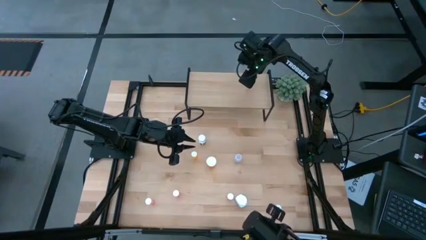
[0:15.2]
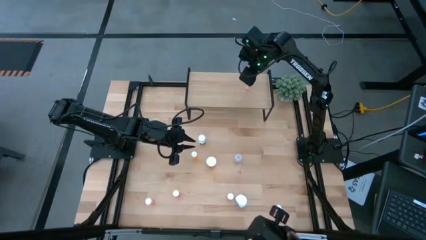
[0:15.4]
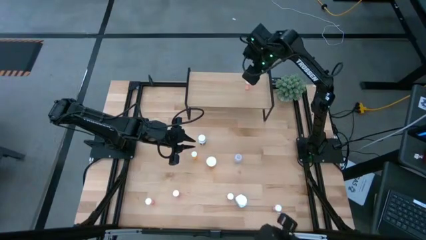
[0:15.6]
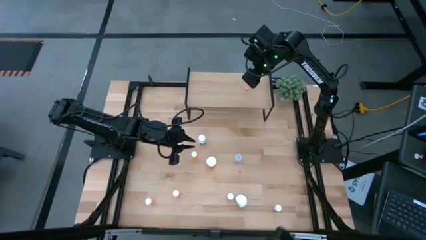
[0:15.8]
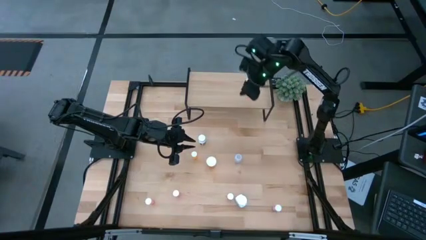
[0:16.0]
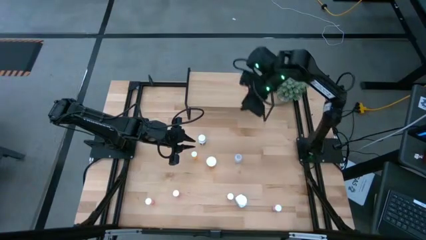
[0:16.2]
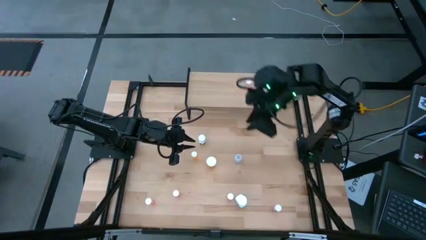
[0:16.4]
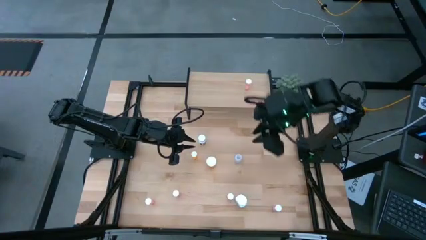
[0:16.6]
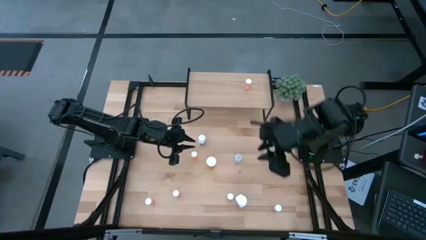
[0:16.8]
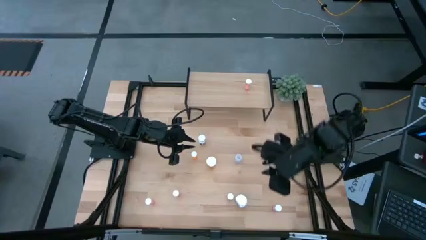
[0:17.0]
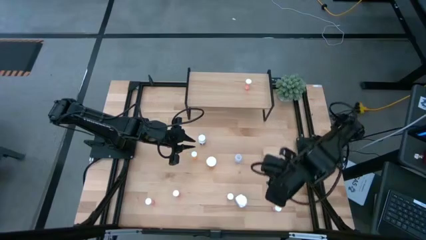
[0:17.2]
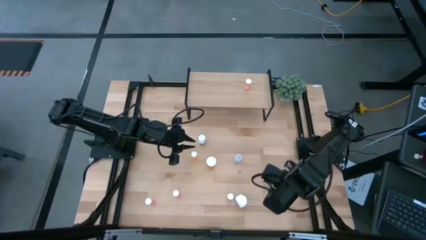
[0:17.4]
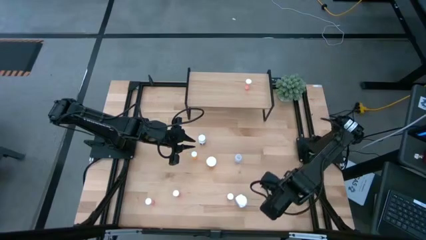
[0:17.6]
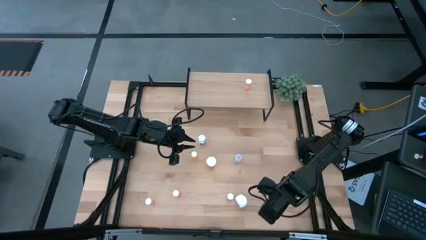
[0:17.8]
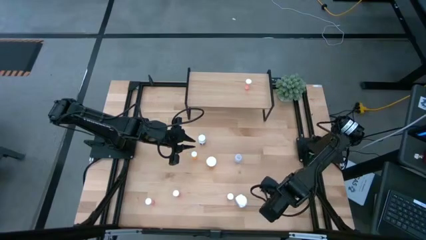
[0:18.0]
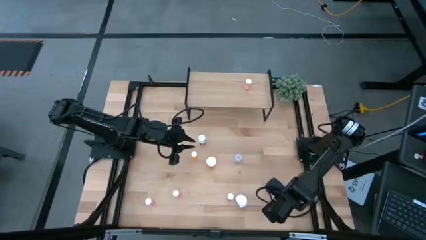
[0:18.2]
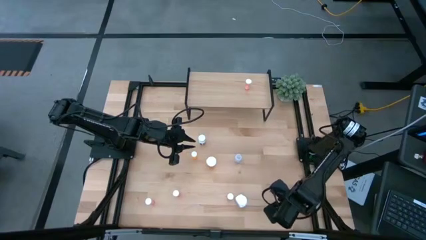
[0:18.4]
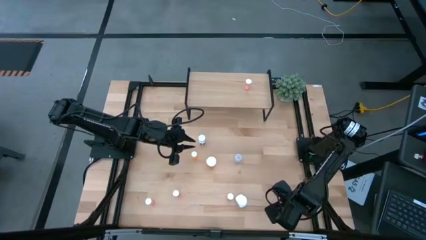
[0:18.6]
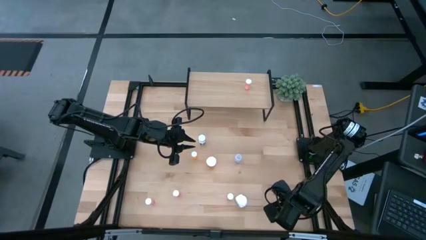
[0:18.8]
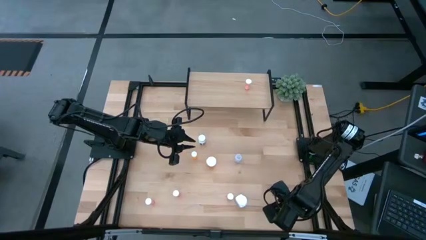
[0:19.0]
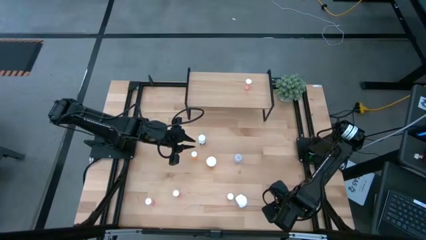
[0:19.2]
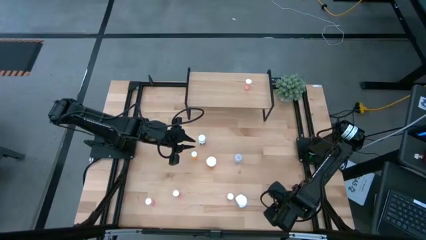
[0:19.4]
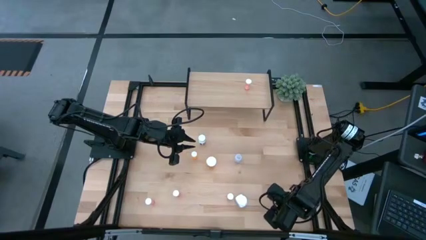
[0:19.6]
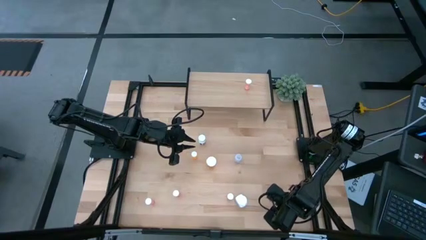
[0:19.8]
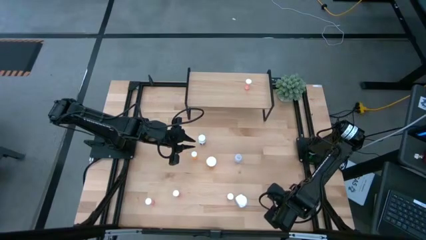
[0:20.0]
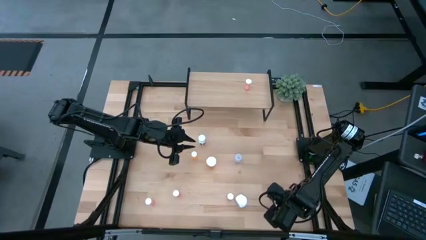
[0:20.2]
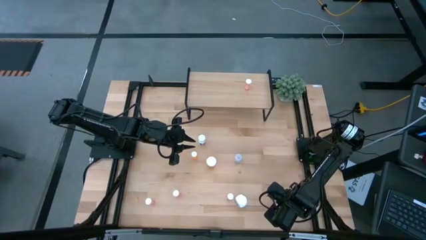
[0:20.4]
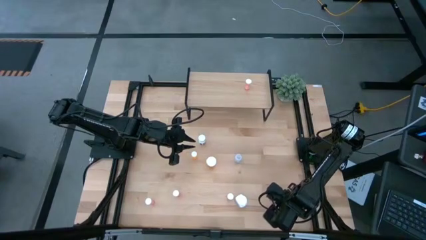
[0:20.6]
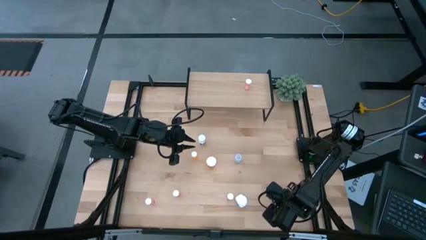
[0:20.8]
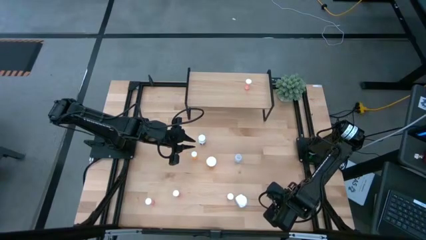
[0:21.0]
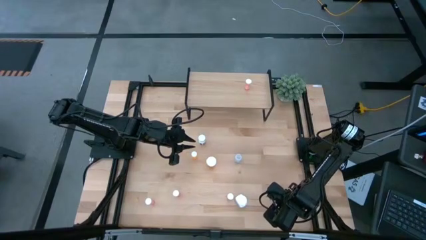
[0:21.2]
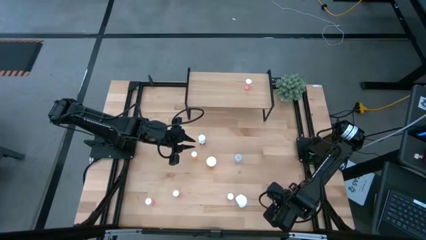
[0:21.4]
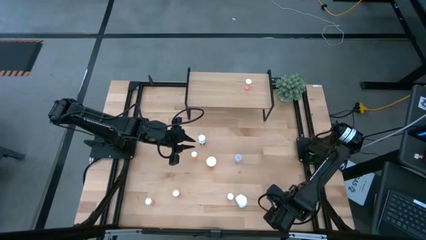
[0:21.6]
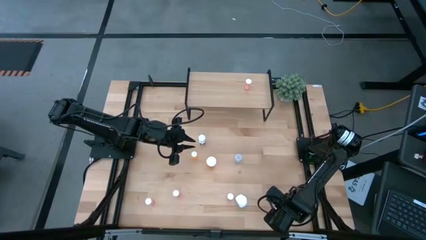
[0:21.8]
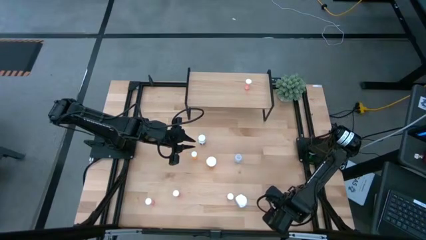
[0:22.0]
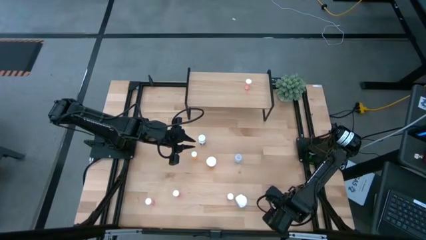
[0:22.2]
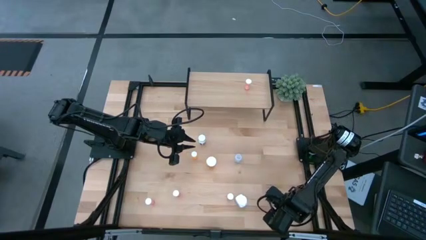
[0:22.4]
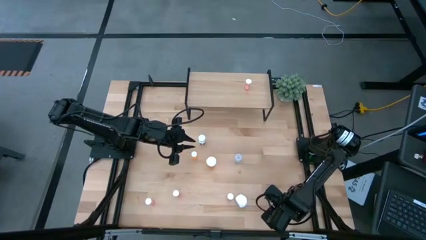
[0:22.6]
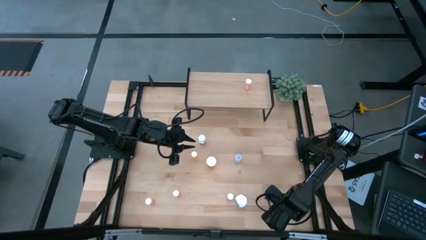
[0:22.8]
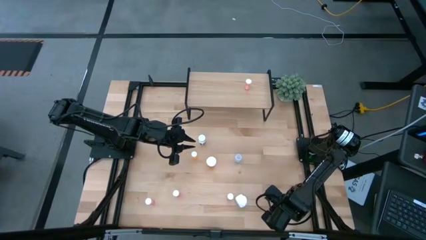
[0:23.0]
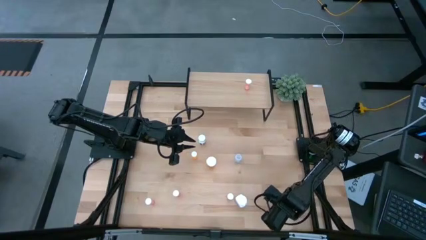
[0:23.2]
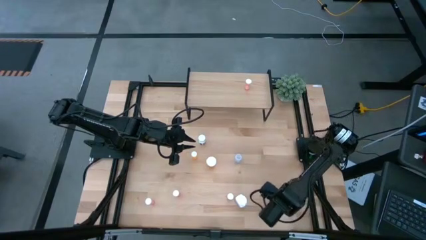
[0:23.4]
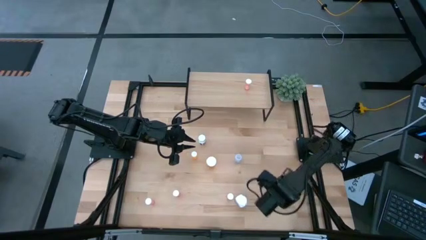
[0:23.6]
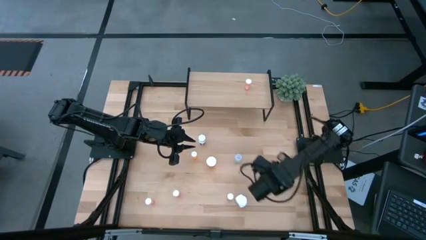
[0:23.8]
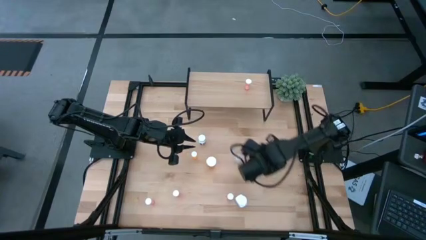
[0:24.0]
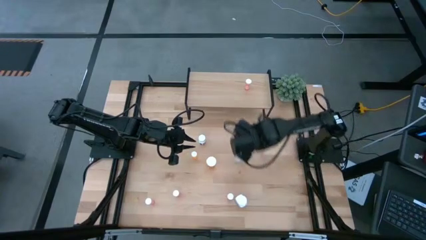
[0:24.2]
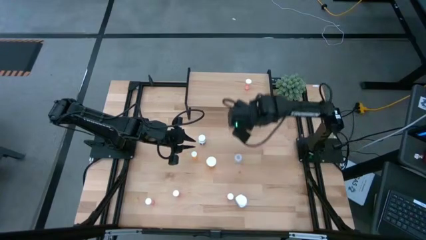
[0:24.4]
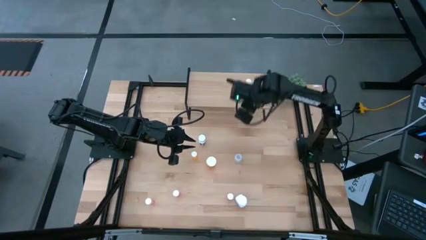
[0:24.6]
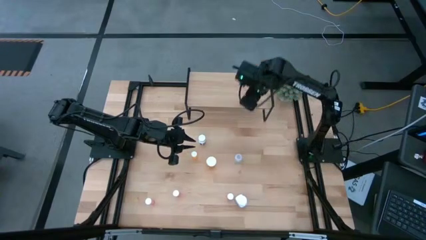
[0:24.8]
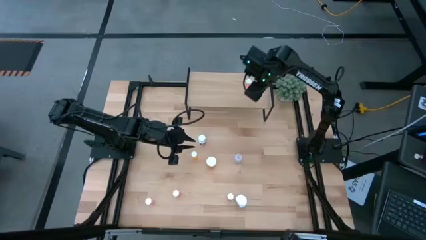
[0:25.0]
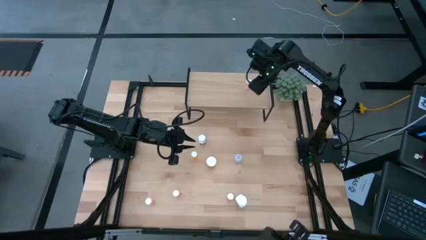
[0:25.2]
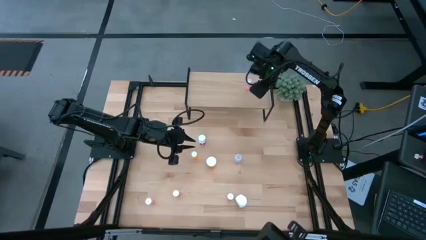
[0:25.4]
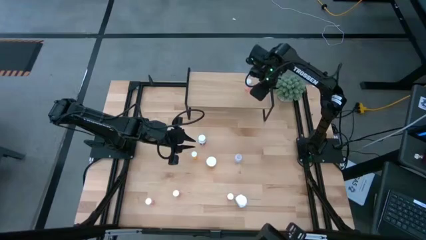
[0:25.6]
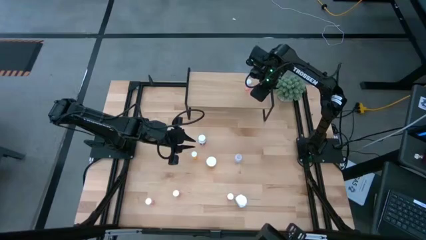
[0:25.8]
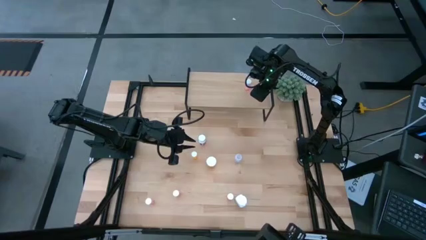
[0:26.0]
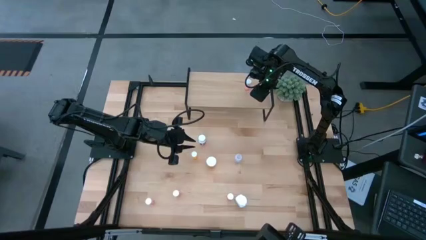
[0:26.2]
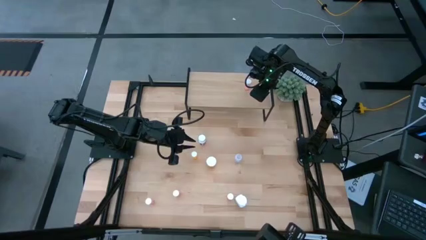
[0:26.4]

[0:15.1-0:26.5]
Task: Pick and place medicine bottles onto shelf by color
Put the violet pill bottle on the shelf

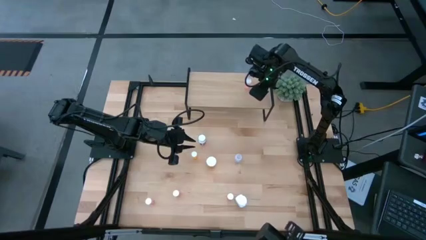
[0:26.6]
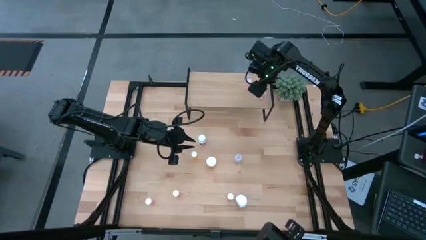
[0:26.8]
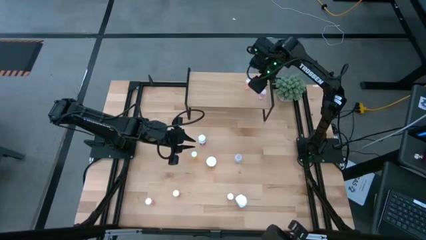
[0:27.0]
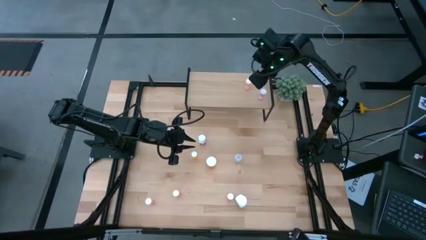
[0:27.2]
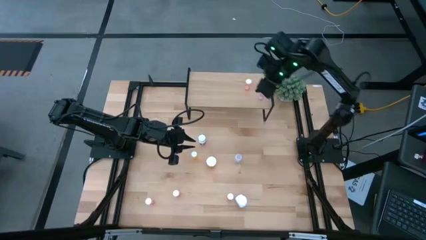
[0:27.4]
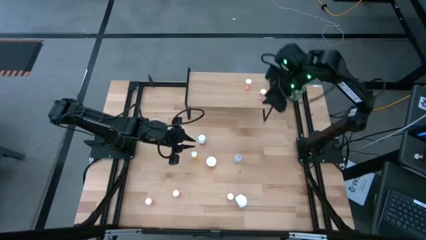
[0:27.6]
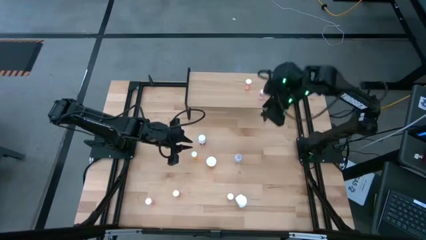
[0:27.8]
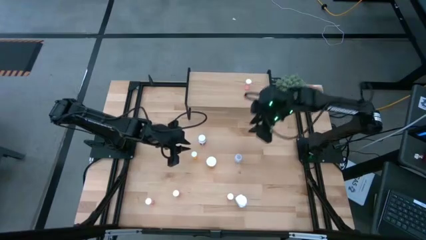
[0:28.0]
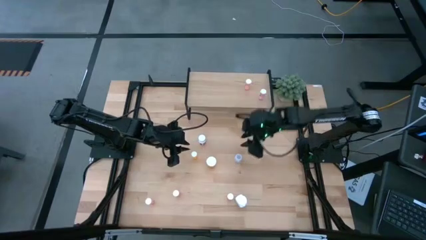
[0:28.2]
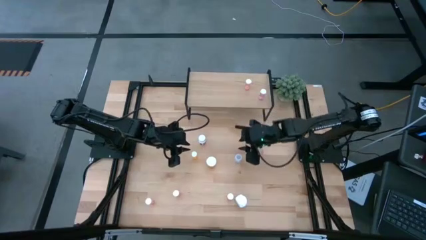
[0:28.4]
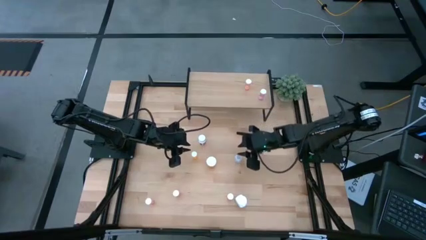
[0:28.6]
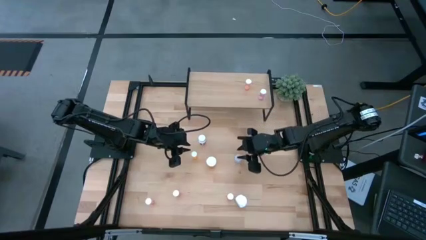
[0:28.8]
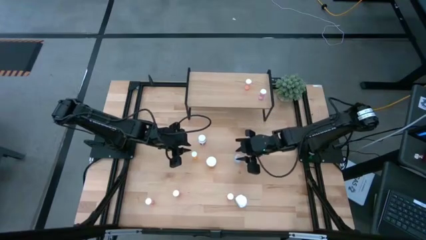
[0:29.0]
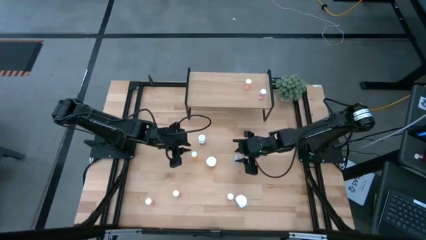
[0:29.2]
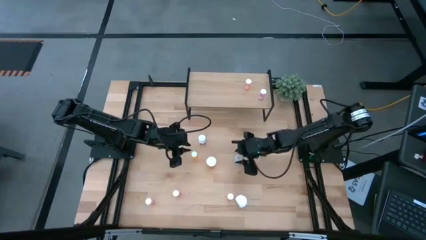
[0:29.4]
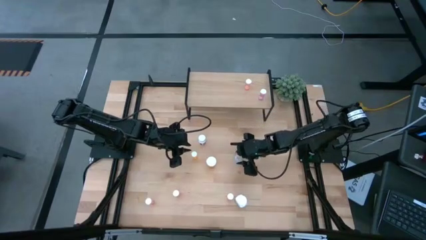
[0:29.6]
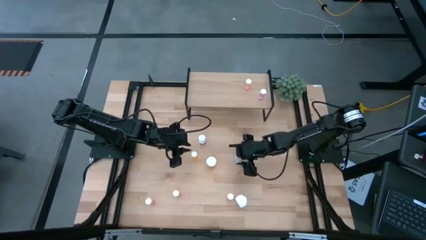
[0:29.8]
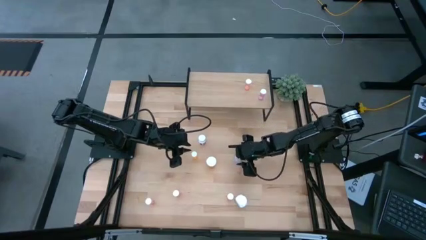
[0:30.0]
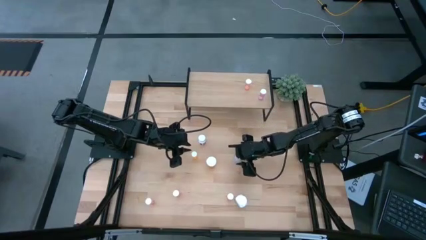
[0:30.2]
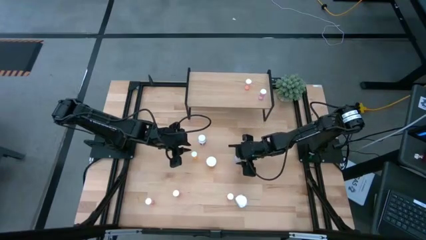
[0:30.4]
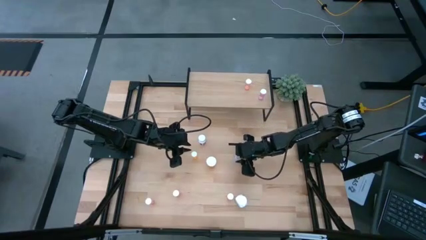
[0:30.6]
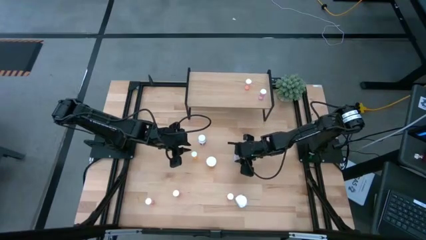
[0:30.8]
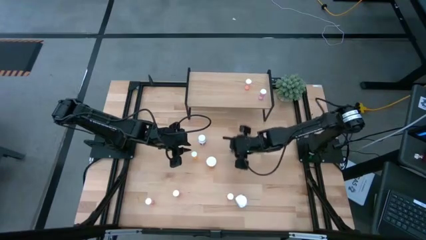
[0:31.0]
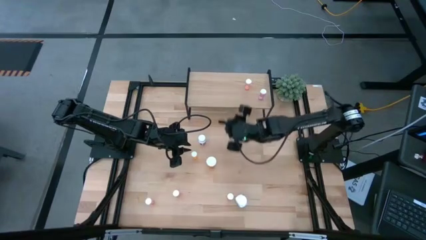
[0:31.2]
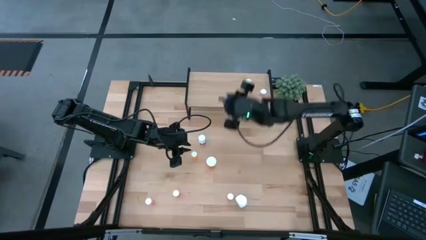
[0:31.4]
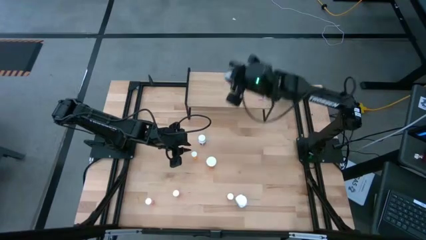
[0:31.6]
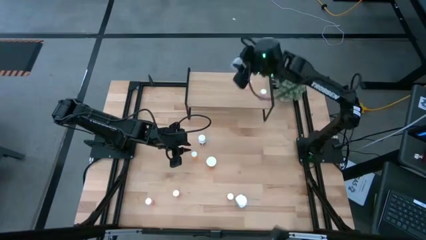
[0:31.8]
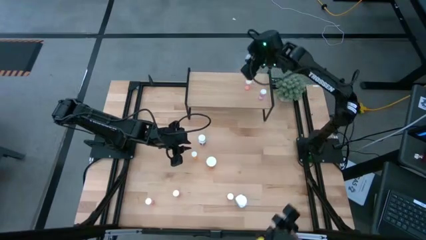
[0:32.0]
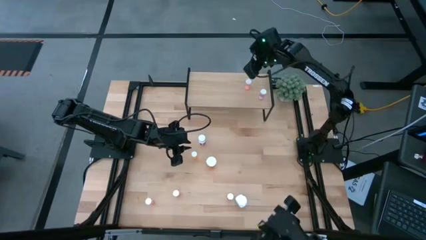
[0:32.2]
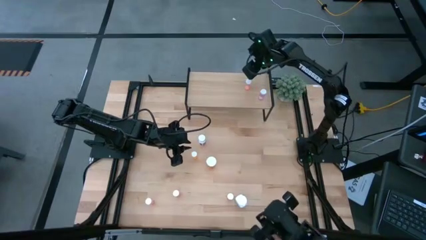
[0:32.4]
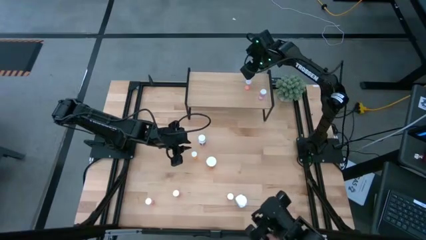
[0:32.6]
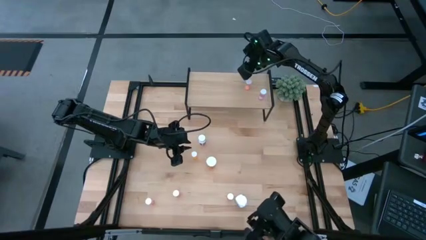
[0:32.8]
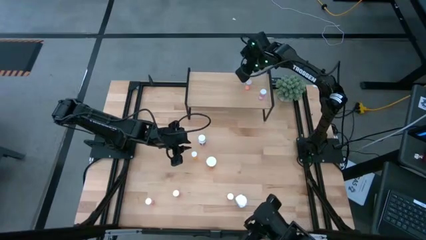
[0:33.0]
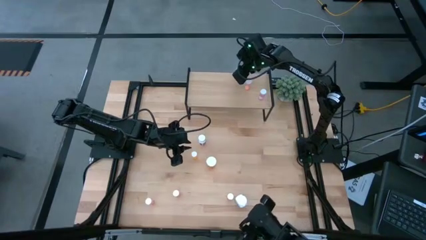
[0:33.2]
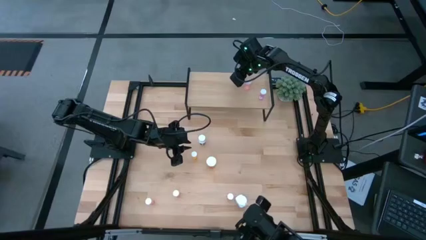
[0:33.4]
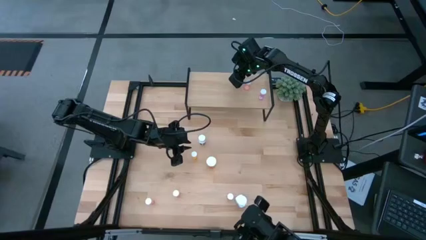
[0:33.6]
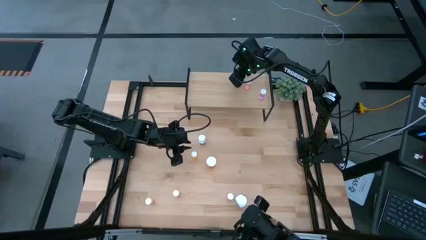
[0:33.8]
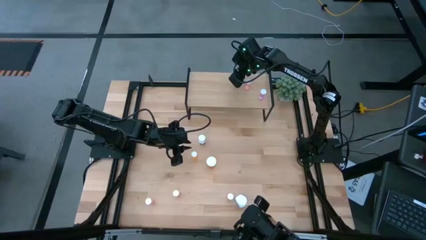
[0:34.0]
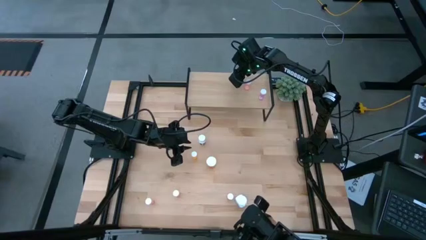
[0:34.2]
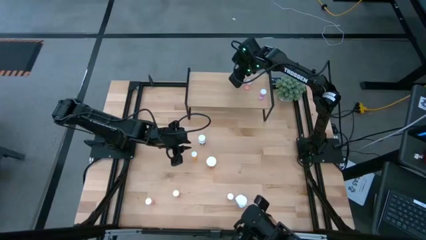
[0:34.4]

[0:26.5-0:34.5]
Put the transparent pill bottle on the shelf
